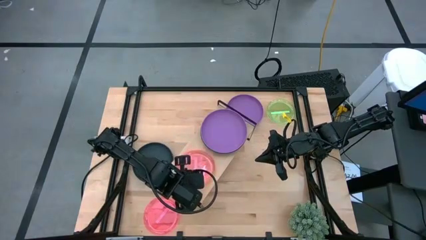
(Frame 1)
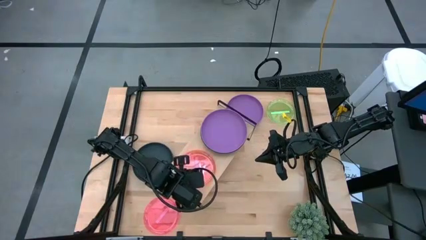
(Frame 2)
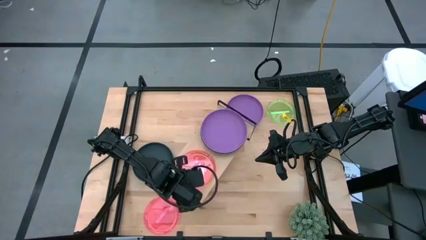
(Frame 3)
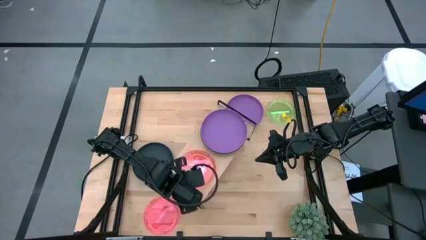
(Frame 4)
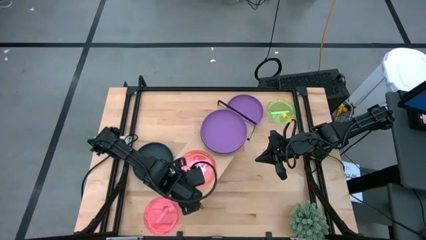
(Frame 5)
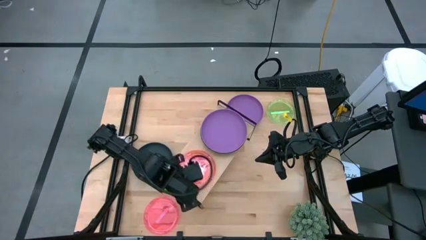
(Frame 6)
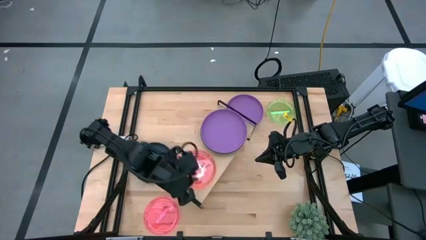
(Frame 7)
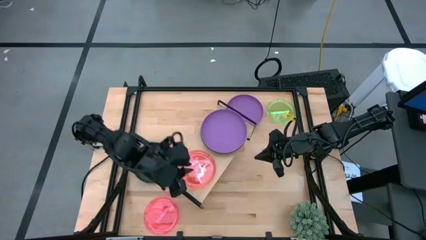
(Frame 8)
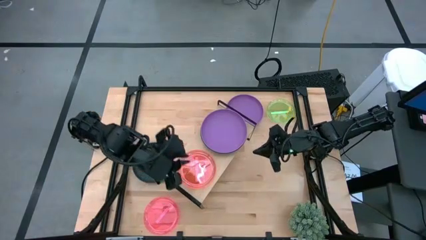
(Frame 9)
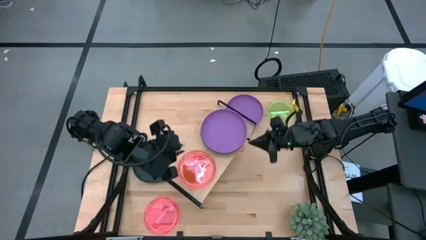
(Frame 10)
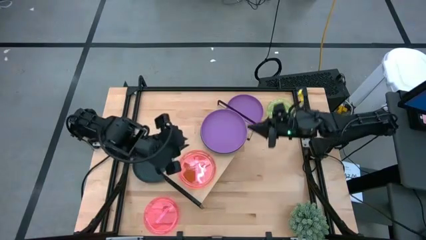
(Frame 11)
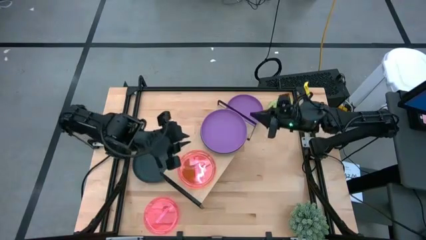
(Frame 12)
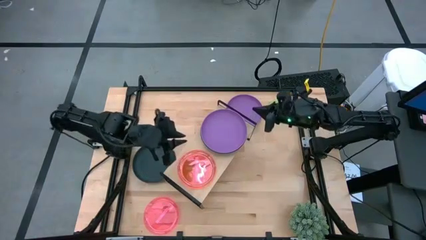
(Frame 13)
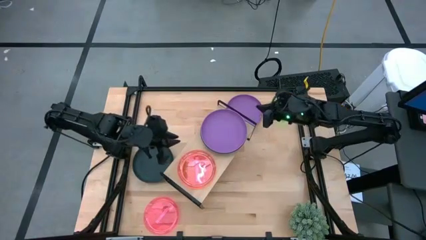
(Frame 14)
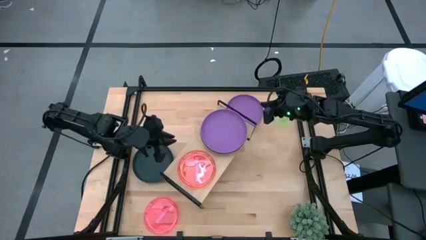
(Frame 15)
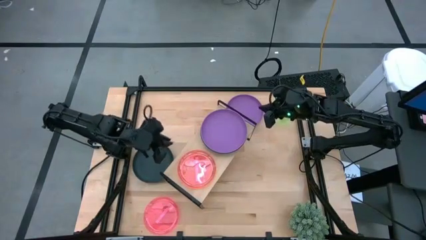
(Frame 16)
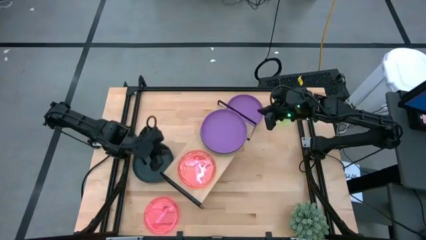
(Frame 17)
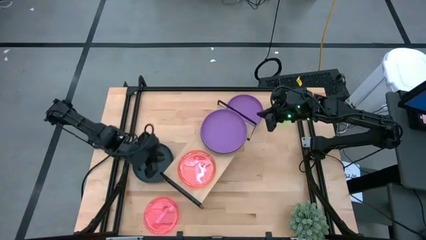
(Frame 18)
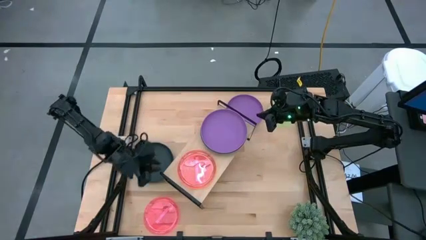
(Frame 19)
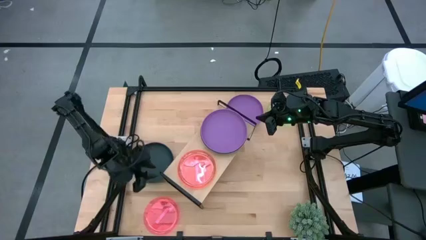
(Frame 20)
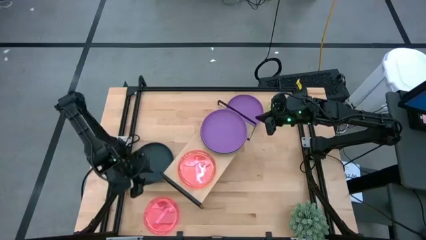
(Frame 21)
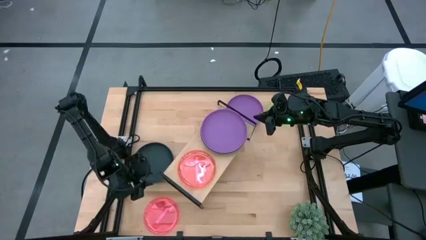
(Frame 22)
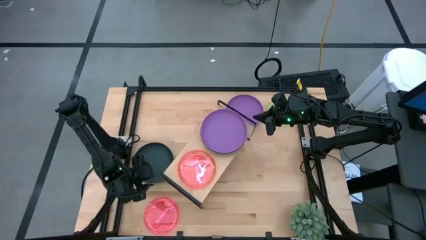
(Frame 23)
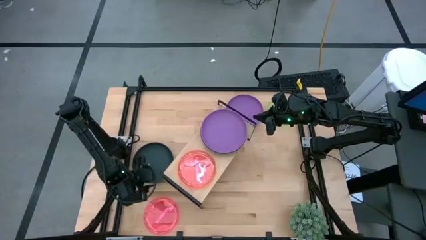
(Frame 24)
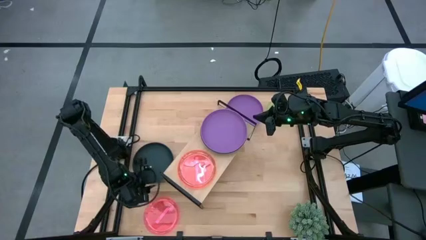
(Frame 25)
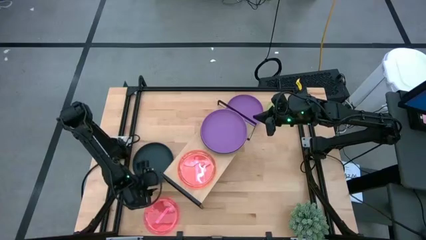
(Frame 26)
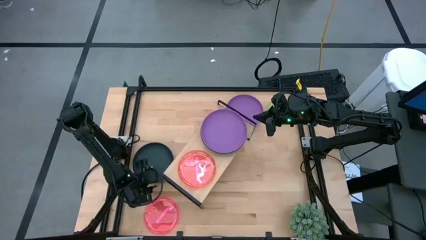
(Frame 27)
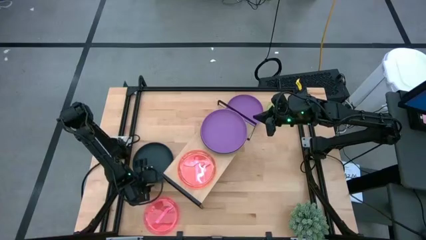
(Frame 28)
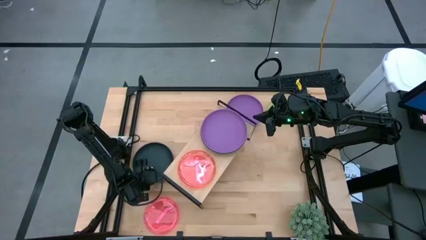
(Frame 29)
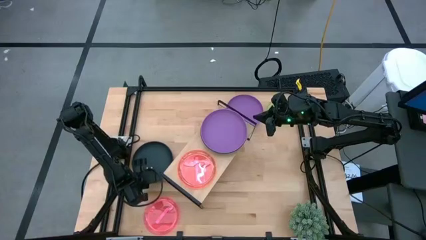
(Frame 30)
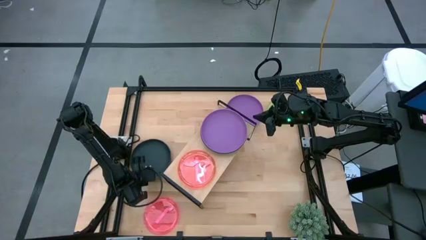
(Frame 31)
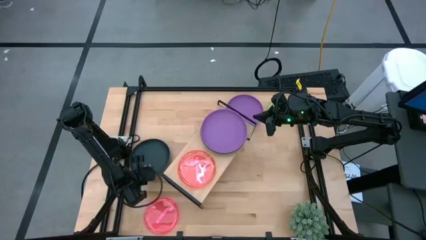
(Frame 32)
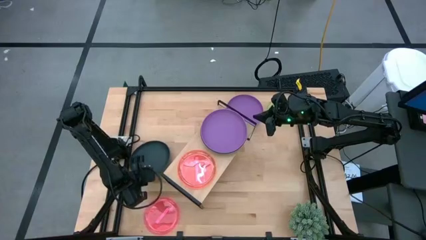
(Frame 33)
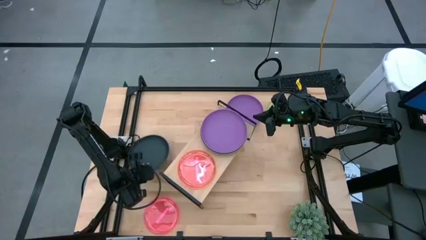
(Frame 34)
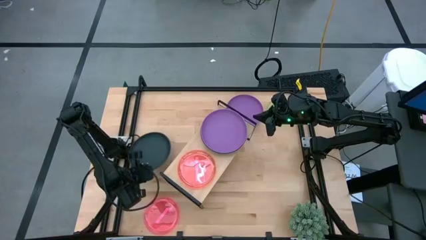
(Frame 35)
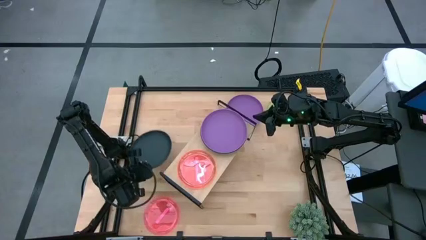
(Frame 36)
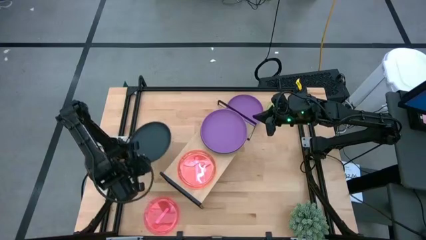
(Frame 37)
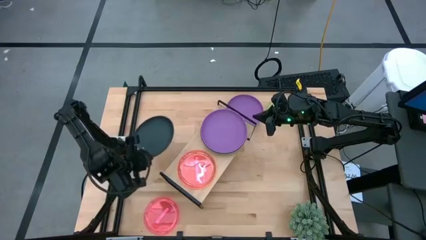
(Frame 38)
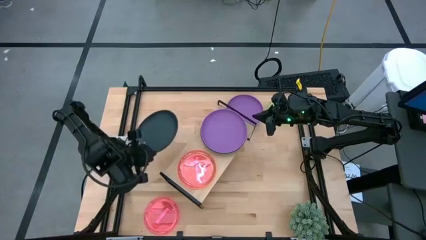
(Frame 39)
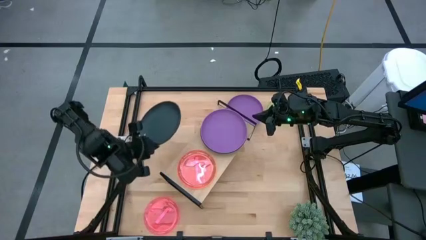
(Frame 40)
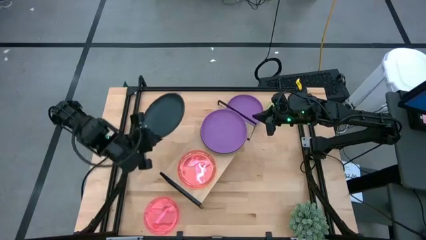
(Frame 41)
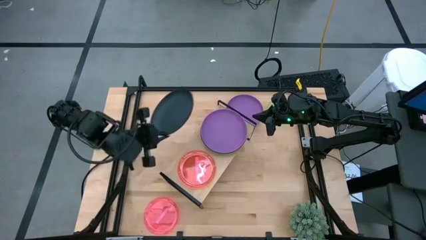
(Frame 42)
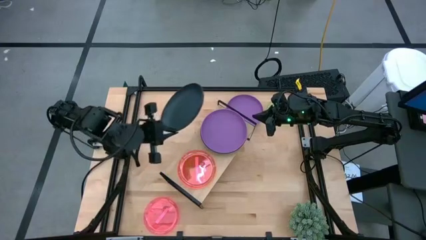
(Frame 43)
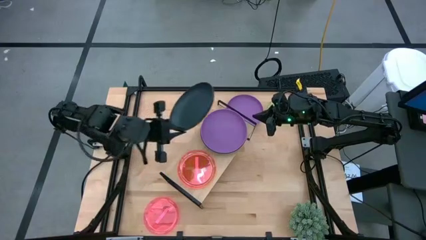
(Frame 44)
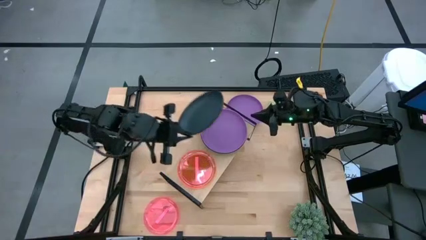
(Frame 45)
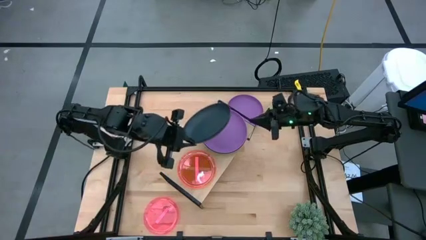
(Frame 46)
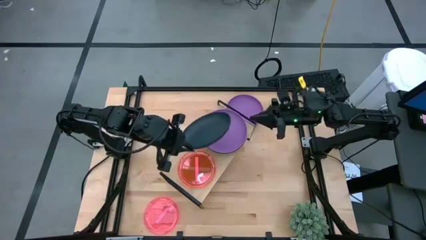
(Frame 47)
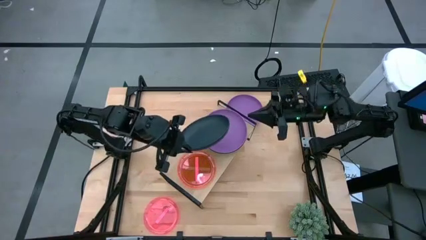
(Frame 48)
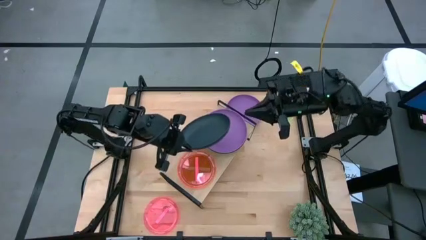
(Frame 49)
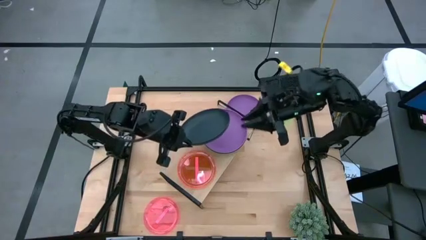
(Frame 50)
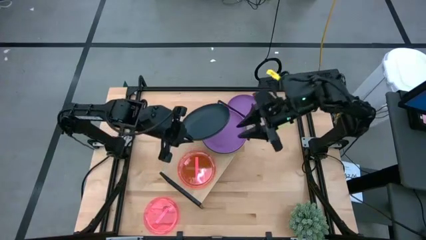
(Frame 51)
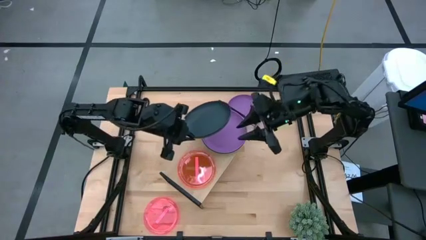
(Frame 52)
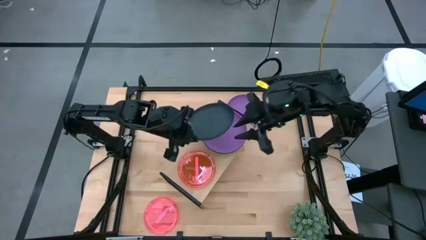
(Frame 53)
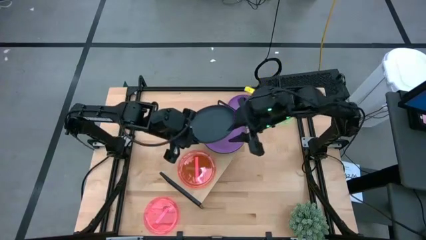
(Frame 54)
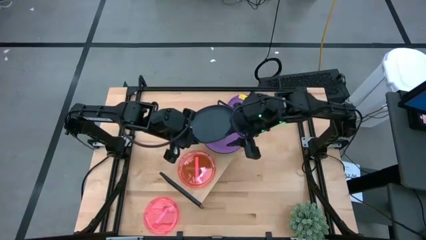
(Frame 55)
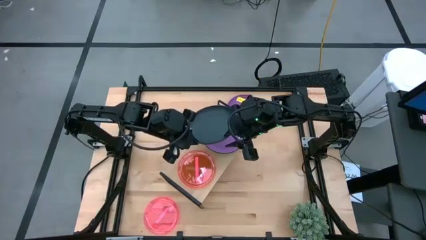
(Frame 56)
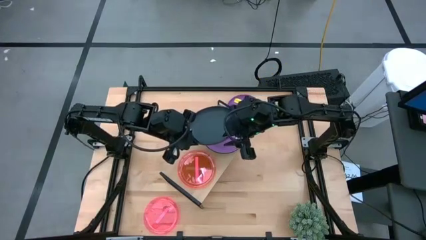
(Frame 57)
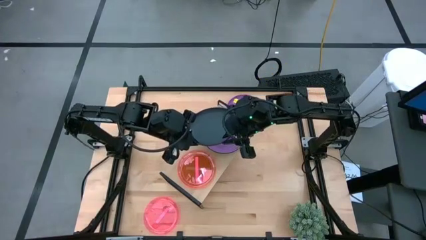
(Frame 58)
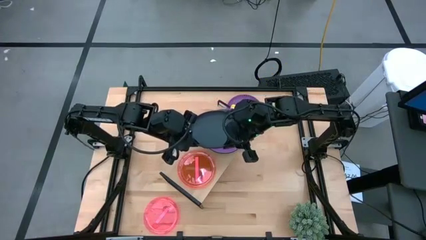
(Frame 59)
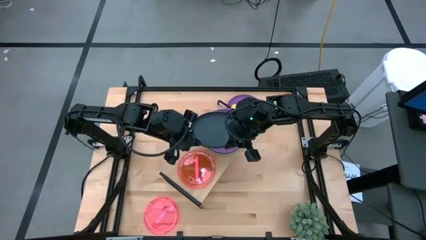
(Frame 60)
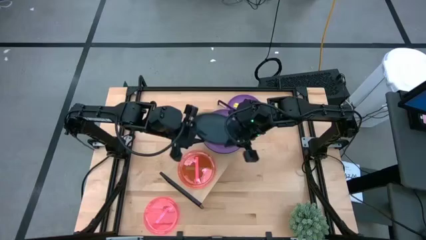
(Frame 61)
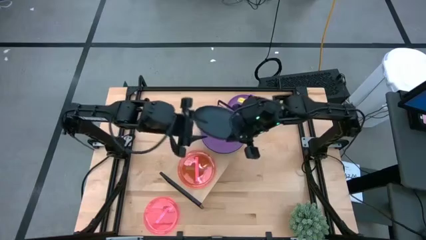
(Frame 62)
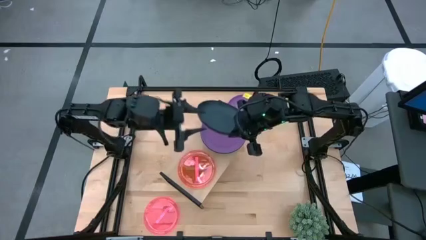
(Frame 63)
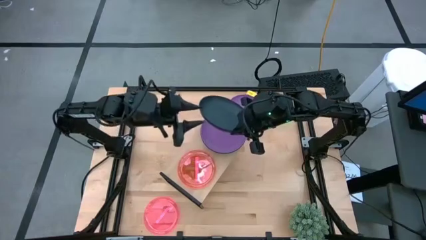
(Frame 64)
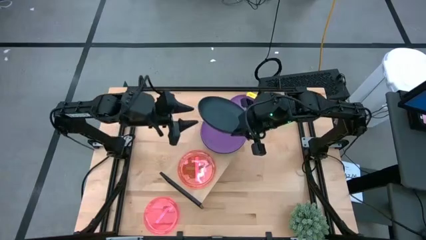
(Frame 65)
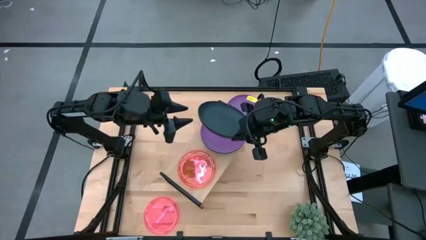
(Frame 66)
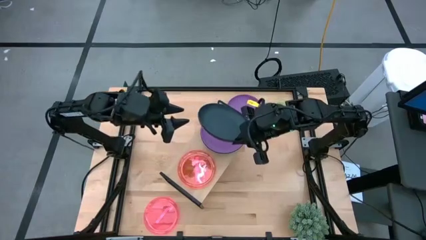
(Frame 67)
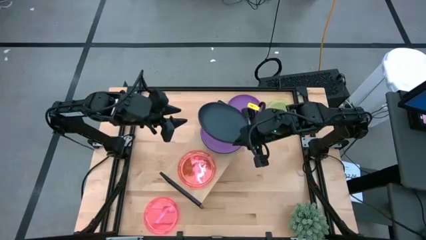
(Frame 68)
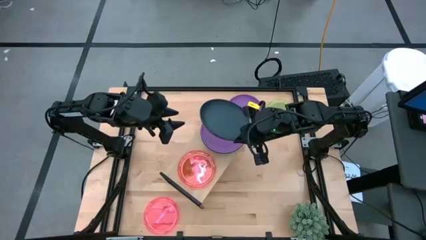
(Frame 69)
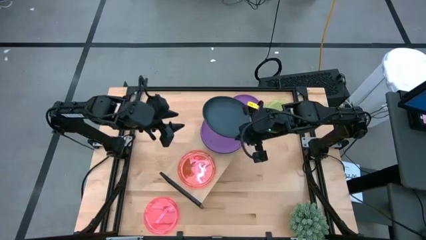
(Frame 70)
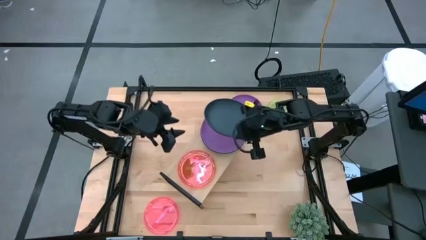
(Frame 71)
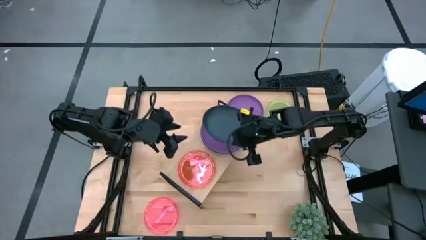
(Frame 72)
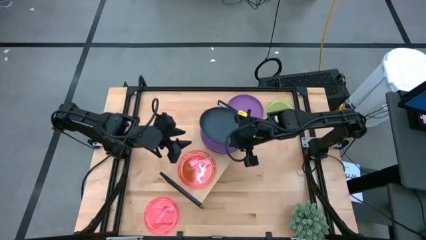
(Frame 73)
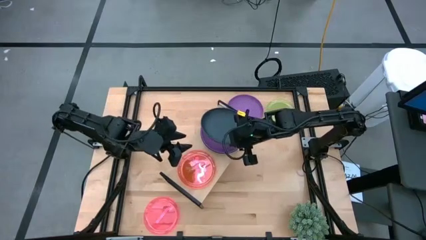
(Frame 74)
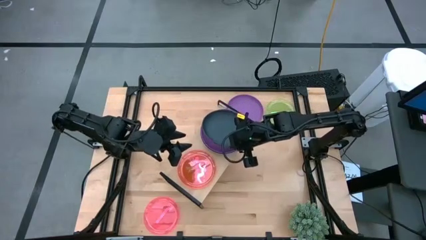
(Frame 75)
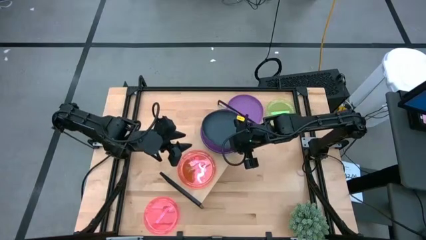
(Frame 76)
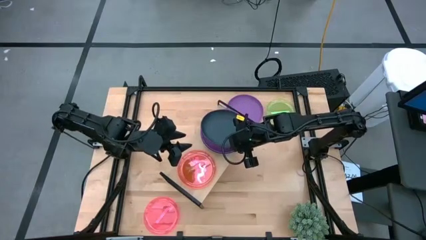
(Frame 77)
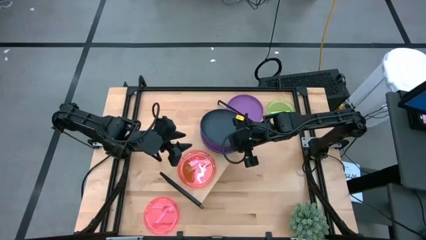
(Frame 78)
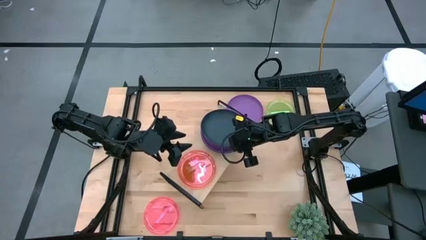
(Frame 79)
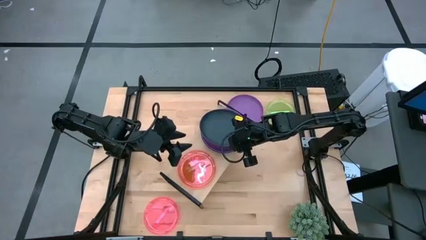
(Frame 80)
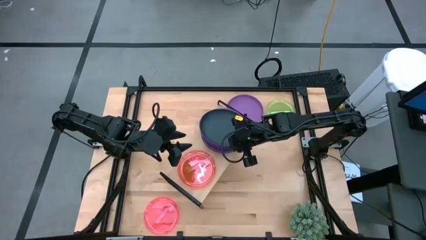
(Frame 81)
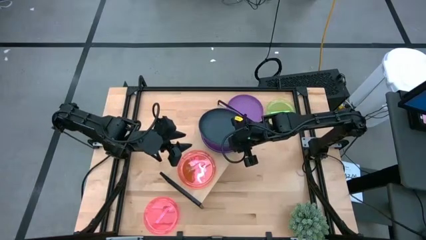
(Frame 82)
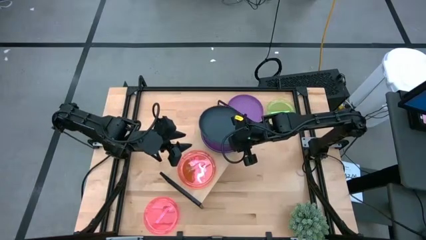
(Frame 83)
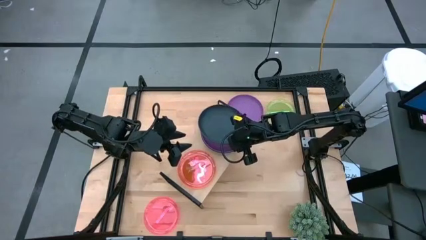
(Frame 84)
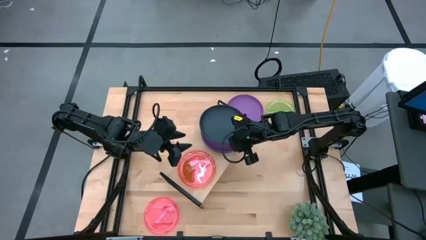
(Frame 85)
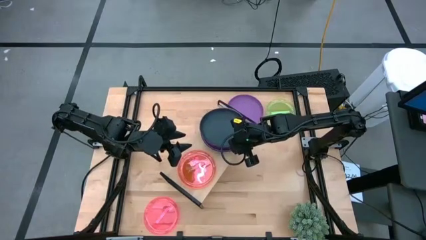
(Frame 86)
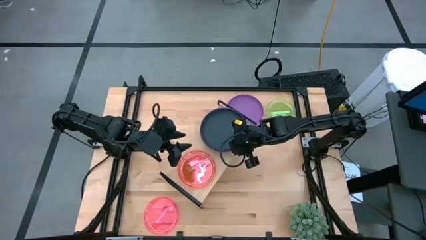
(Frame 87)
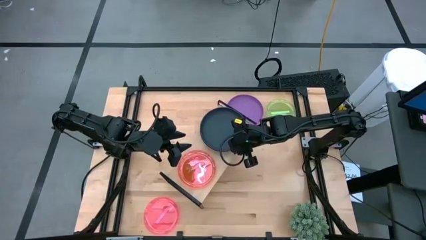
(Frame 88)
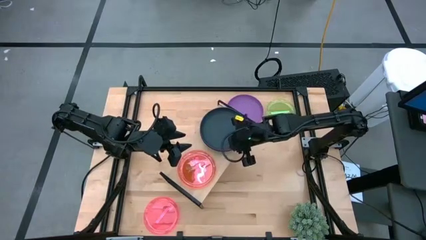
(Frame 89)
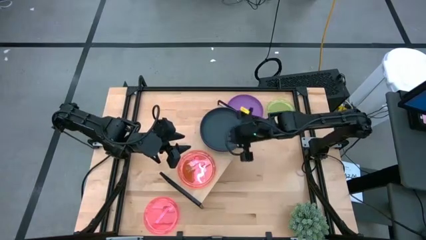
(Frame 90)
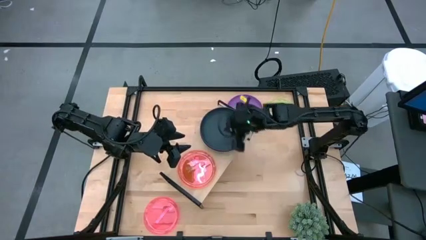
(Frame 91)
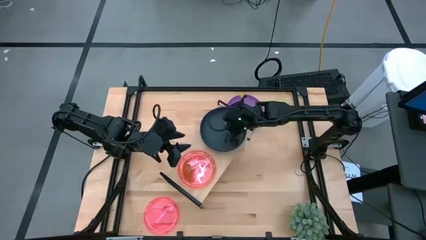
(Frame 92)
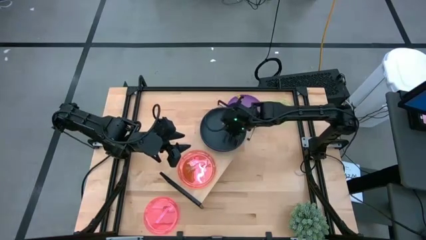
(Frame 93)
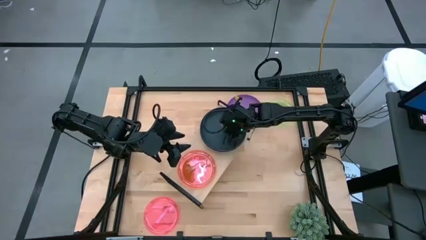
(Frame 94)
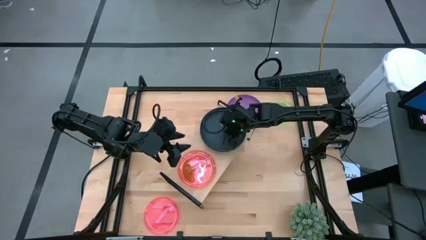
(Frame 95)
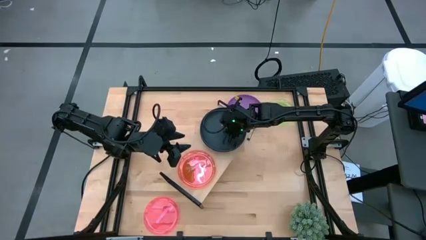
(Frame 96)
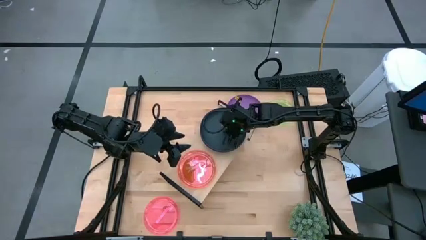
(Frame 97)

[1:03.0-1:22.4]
Task: Place and stack plates onto a shelf
Stack the black plate on top of the purple plate on the shelf
